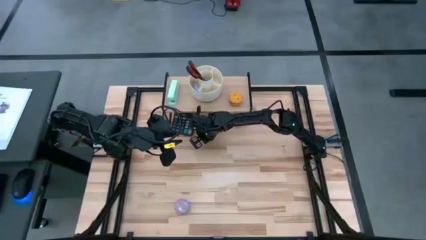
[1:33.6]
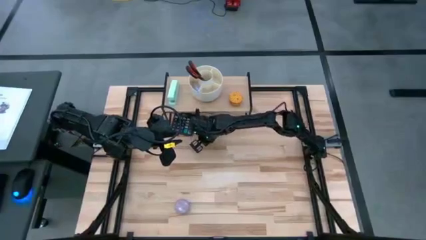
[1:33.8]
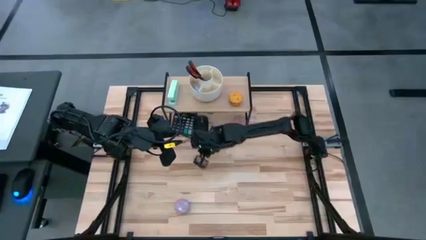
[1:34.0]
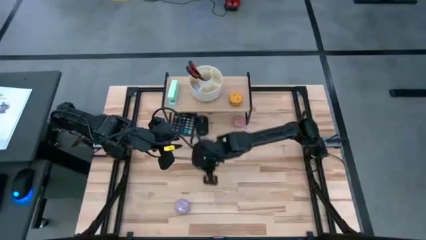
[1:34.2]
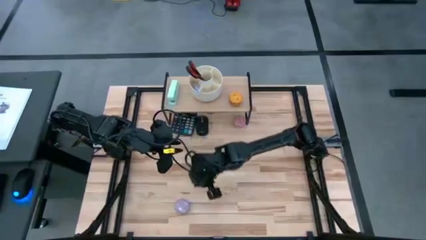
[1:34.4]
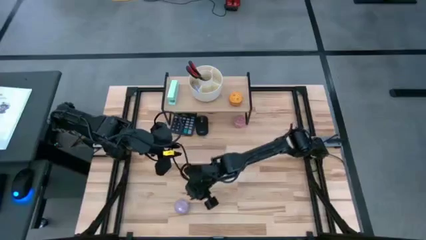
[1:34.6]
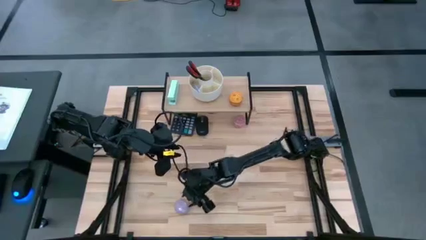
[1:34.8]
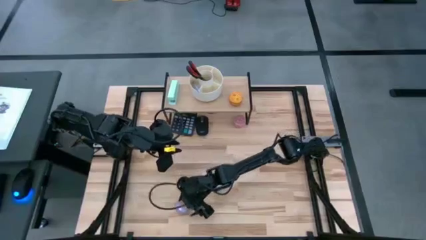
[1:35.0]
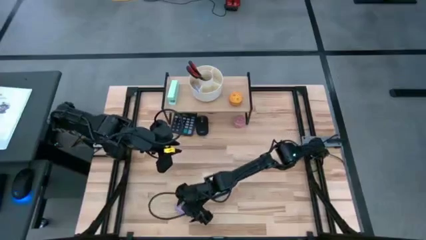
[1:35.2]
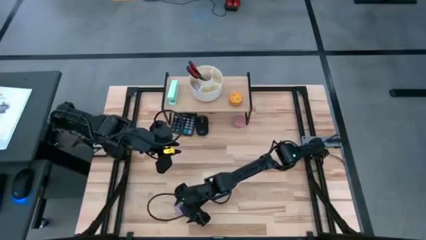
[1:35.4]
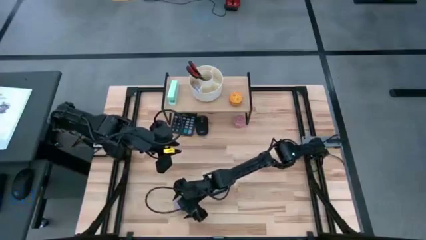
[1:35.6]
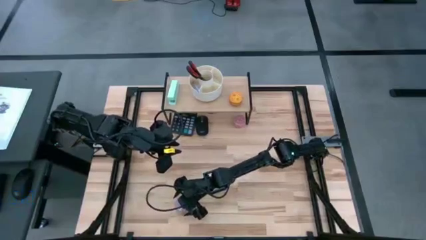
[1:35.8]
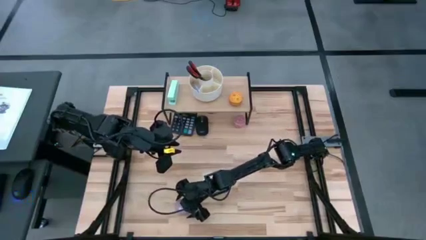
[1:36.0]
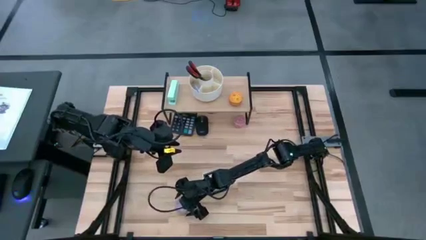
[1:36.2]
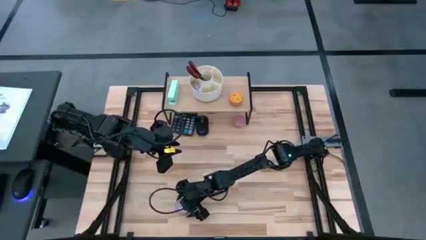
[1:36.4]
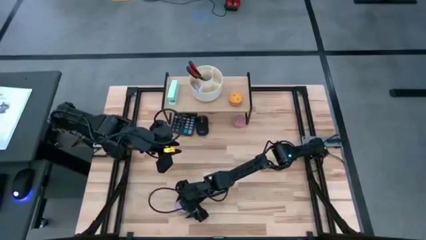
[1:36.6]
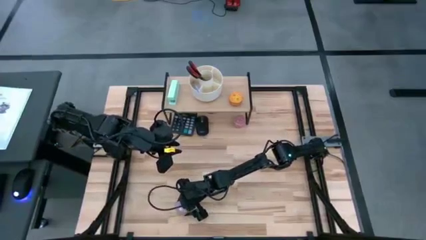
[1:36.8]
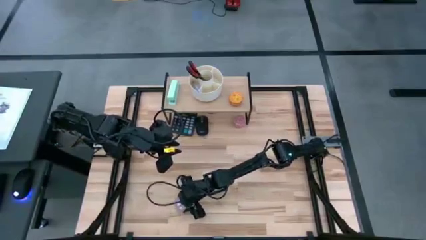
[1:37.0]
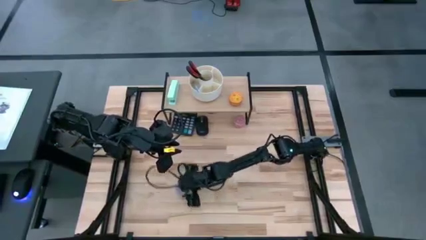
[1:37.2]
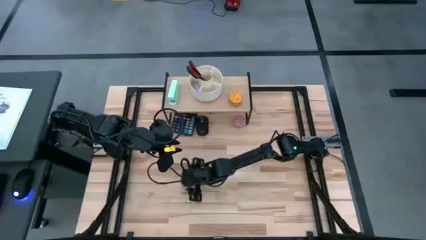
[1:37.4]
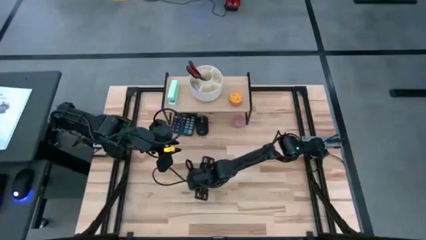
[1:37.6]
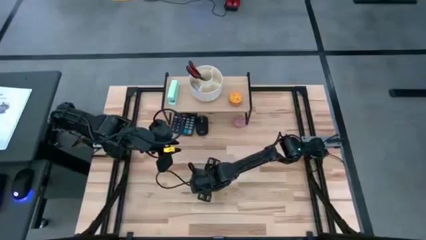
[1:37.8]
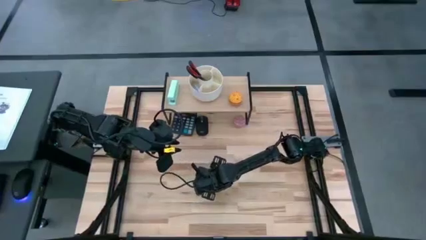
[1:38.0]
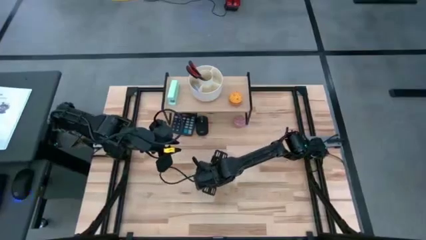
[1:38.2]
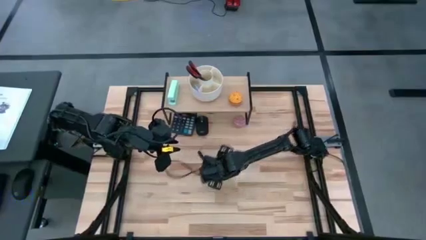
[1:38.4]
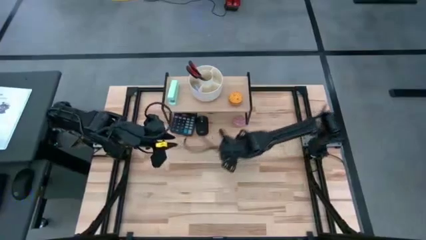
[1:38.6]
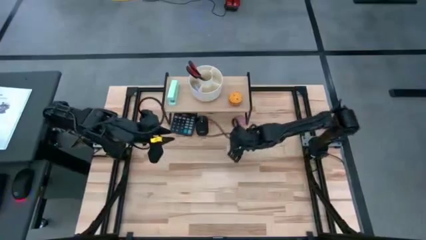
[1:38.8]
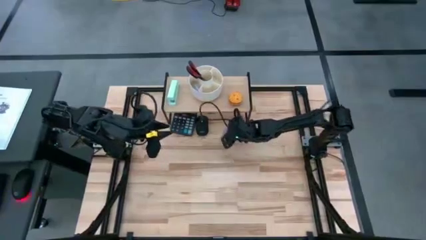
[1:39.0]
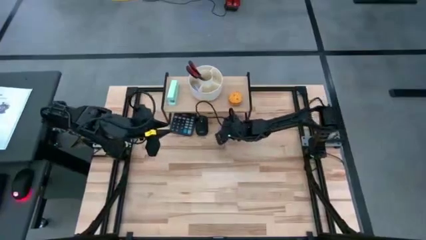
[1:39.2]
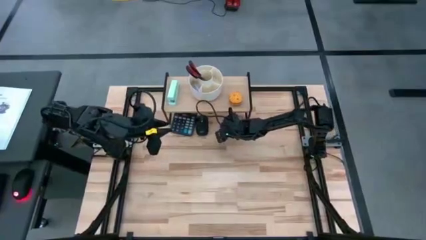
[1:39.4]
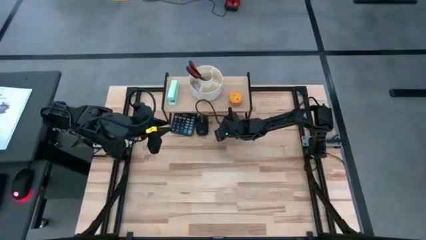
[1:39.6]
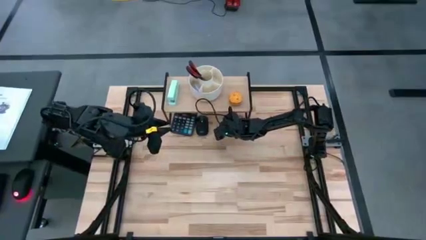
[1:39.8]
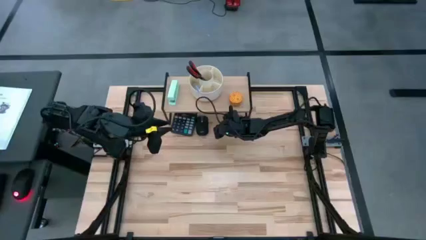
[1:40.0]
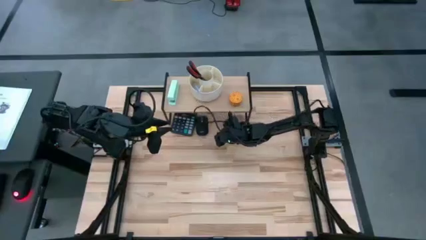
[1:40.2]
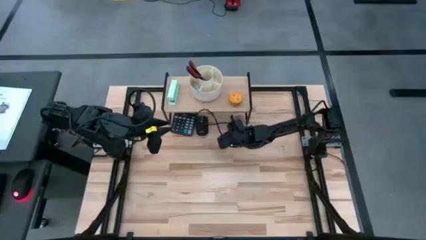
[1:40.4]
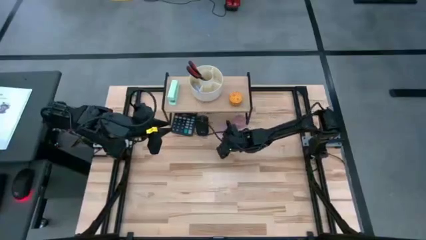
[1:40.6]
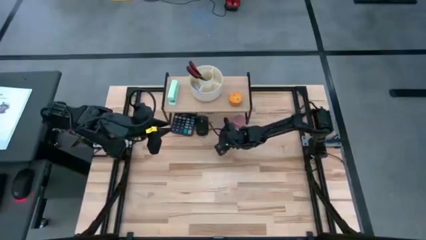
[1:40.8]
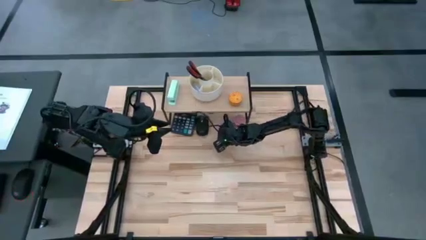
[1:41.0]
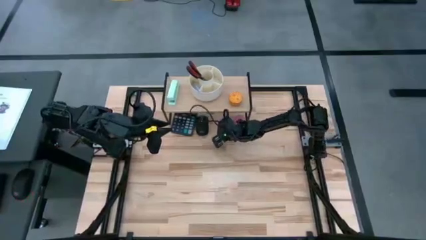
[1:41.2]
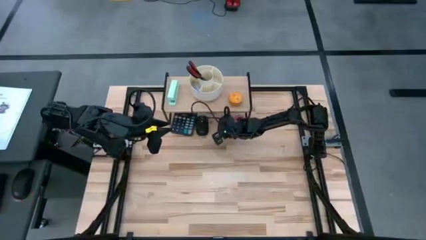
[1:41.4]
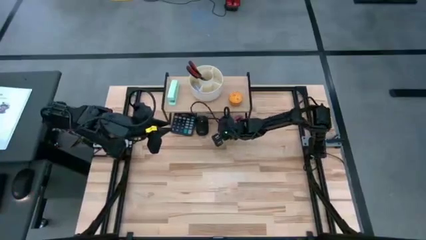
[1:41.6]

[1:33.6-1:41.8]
Task: Stock shelves
Put the pink scented candle under the shelf

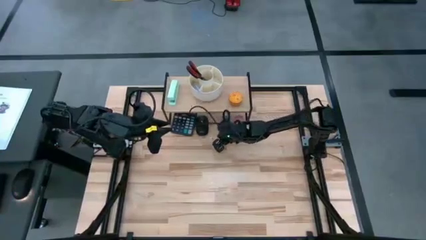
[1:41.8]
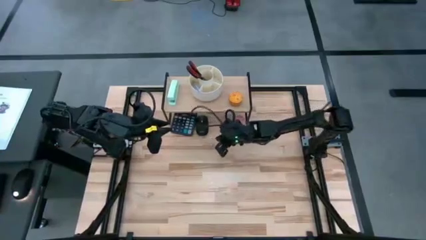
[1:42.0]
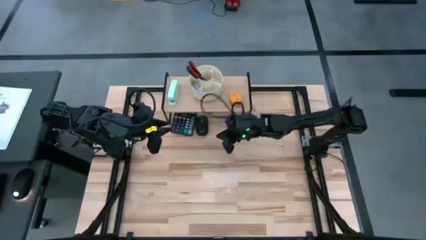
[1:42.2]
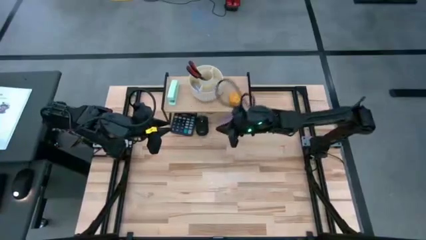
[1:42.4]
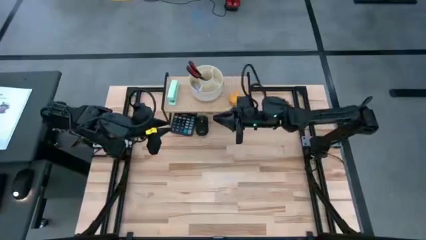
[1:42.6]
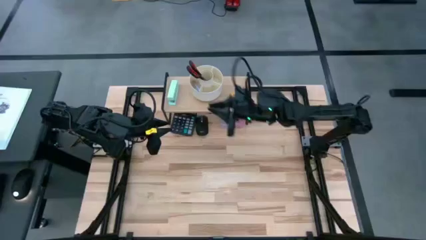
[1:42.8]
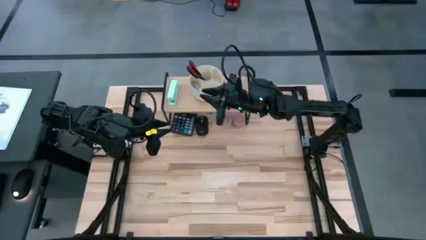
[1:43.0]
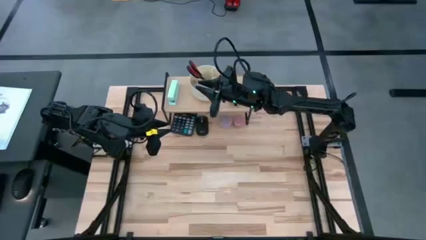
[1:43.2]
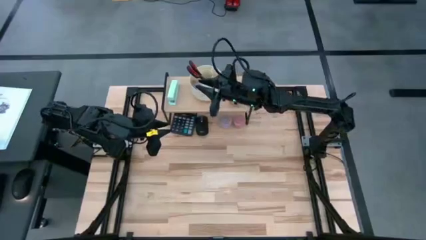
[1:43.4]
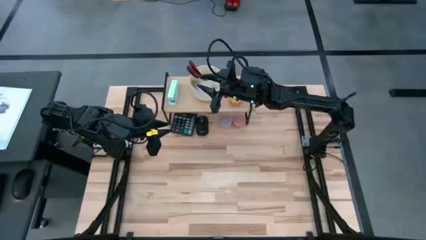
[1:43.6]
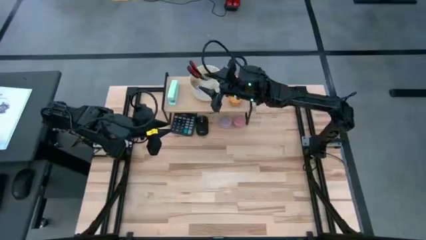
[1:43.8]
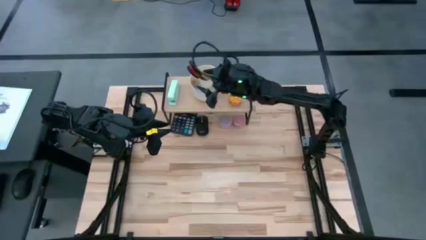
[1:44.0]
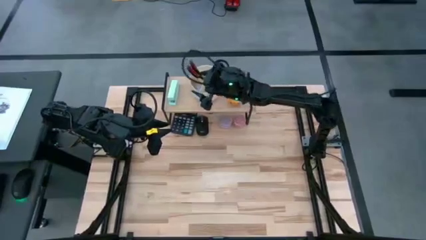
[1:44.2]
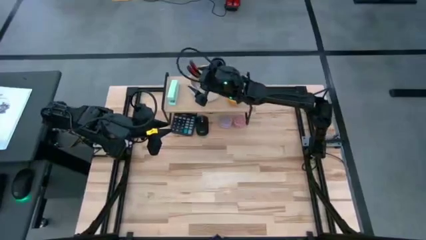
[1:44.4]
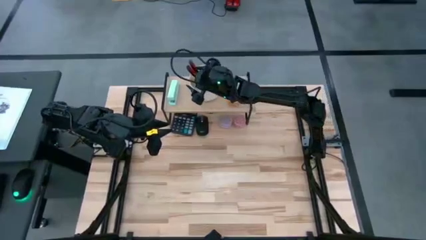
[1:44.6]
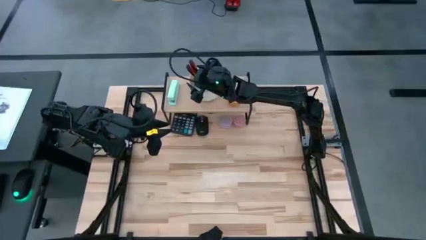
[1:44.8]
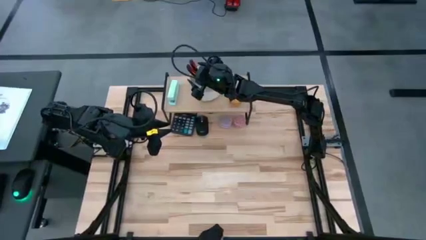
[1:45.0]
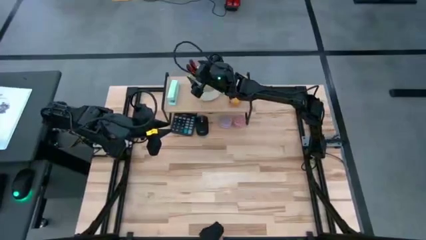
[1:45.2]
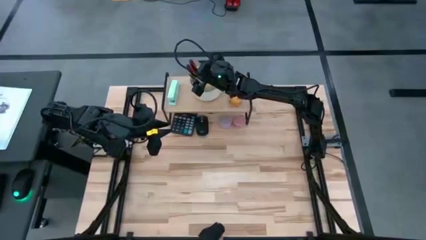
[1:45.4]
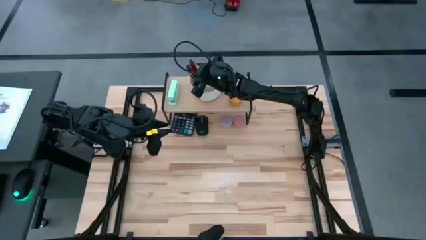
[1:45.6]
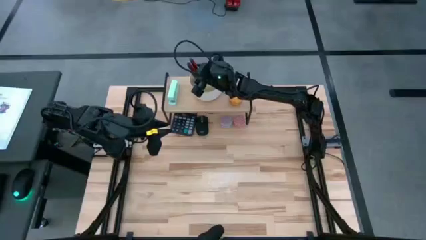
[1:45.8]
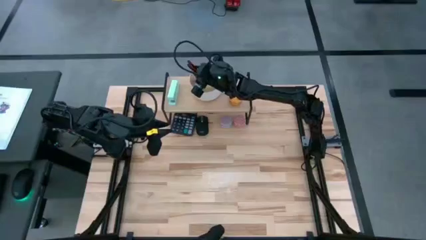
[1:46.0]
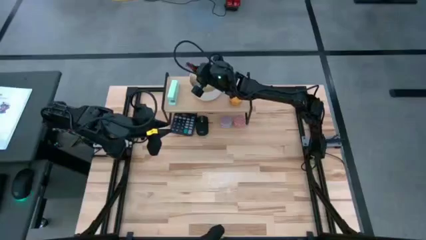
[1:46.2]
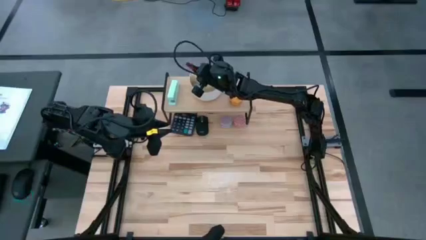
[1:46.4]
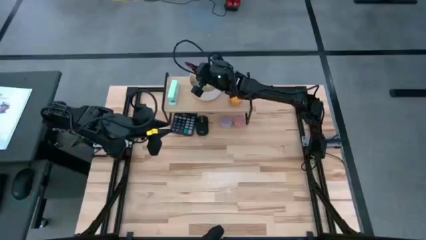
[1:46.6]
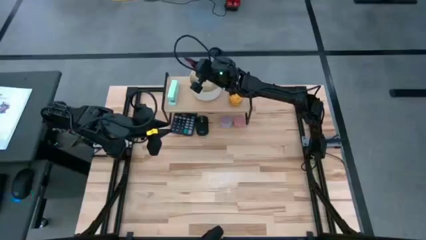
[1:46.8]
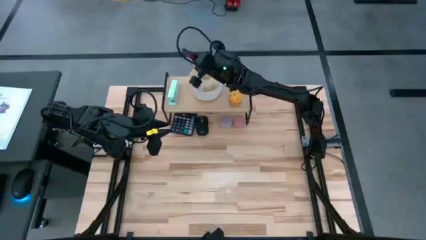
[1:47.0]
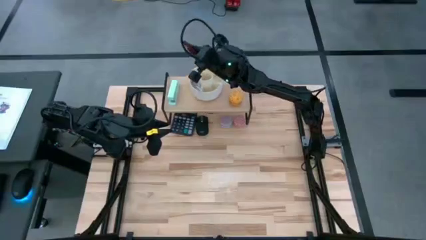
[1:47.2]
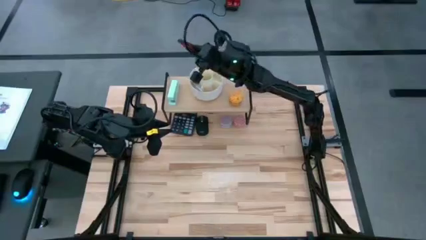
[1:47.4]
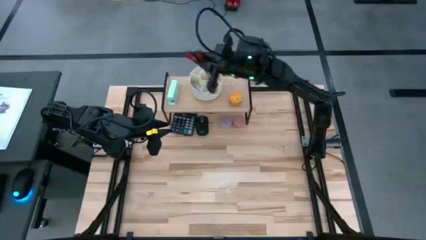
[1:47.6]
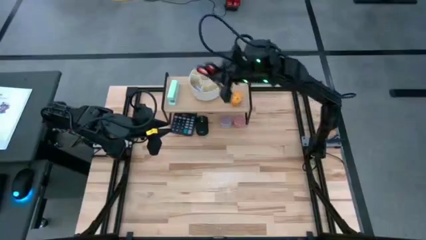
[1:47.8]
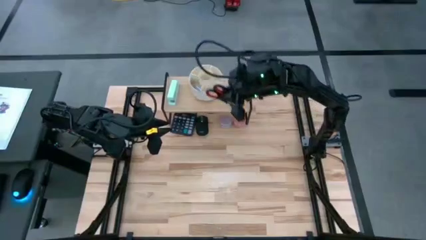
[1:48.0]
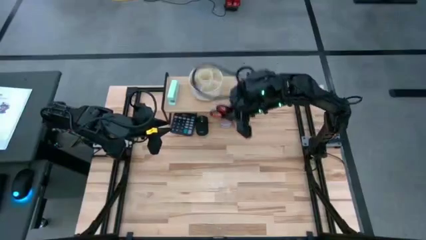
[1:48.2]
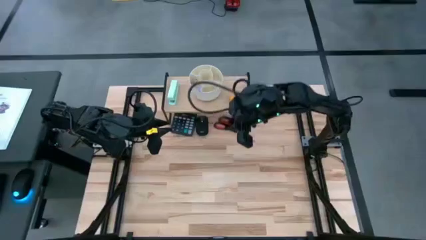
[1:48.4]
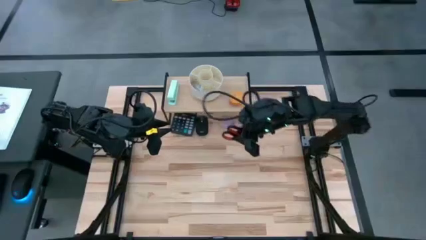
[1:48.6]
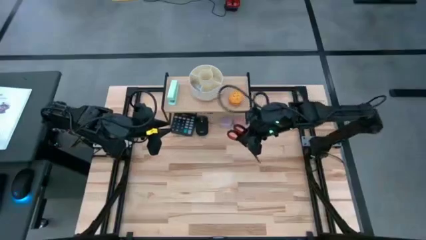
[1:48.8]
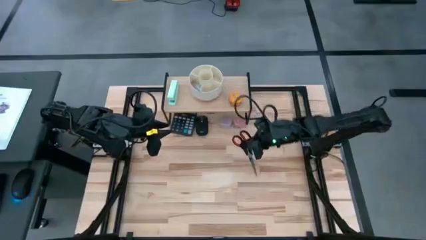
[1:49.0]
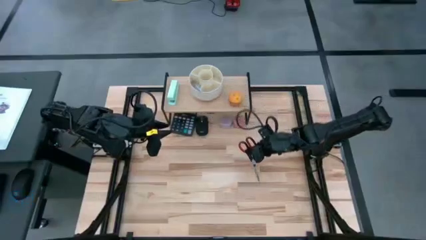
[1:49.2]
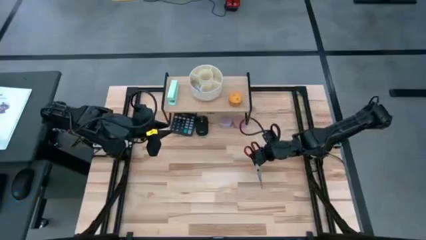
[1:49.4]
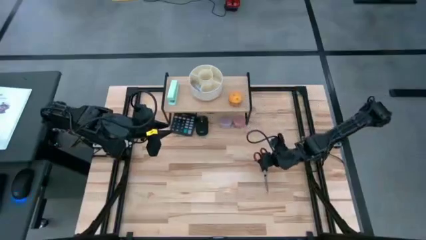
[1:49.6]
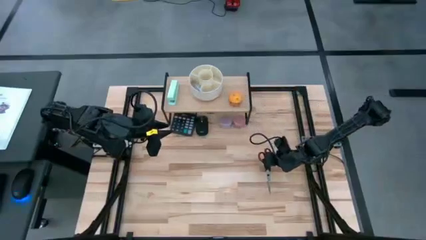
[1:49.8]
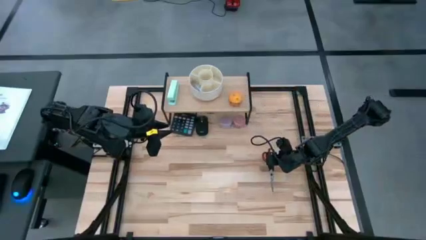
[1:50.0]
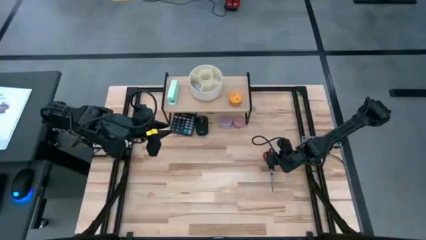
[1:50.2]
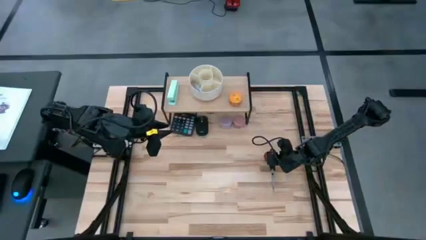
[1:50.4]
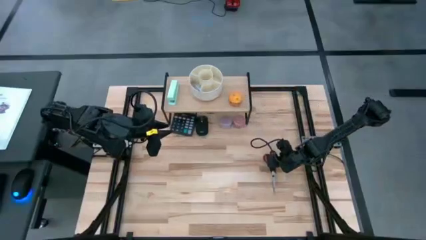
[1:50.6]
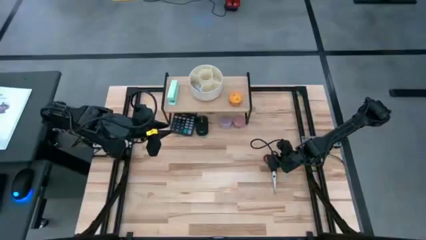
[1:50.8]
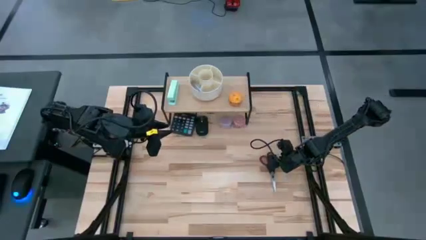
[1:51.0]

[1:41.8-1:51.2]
Remove the black scissor from the white desk organizer
